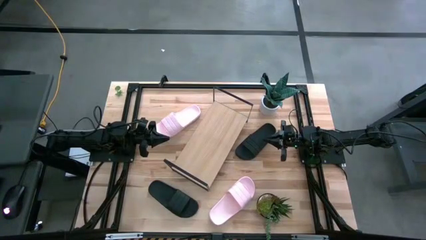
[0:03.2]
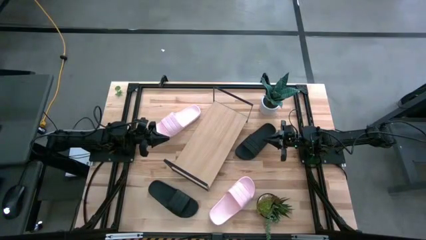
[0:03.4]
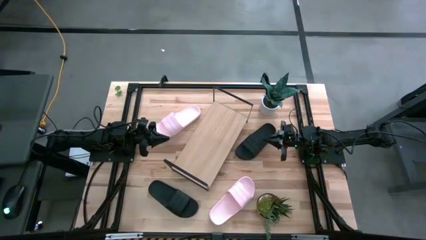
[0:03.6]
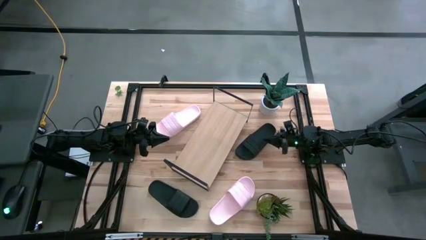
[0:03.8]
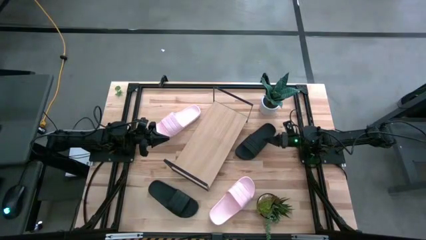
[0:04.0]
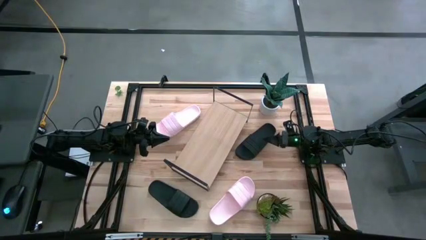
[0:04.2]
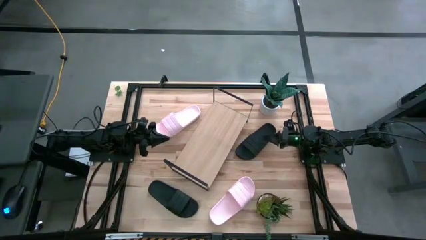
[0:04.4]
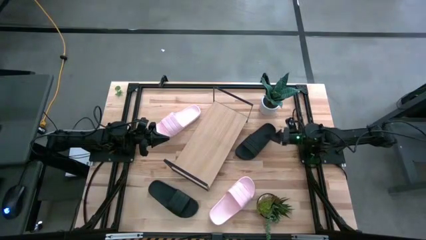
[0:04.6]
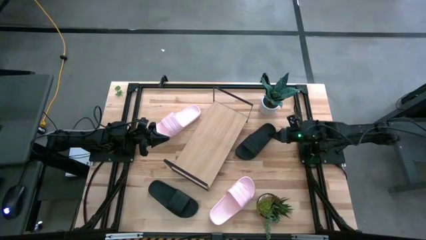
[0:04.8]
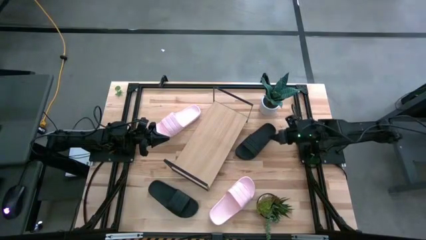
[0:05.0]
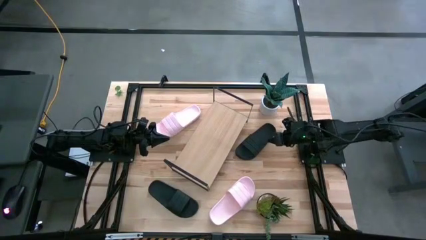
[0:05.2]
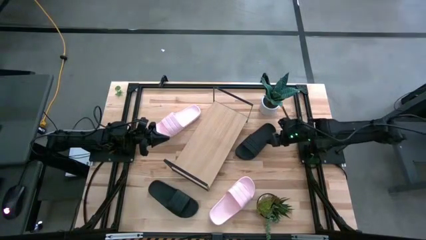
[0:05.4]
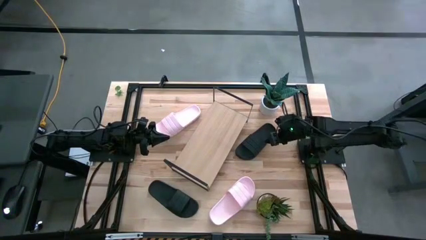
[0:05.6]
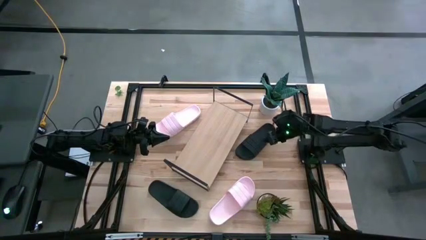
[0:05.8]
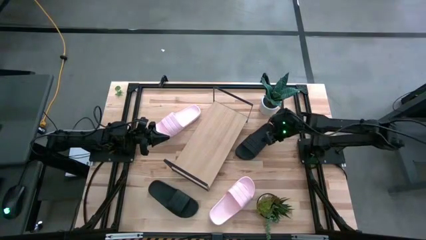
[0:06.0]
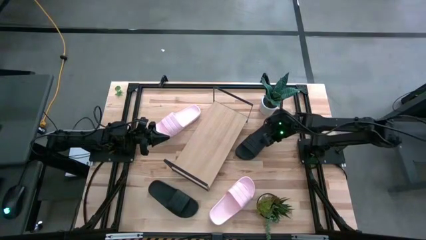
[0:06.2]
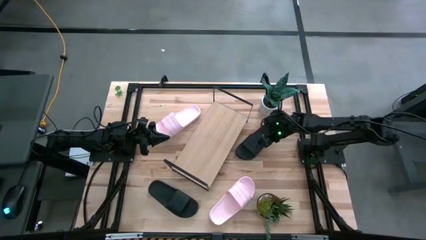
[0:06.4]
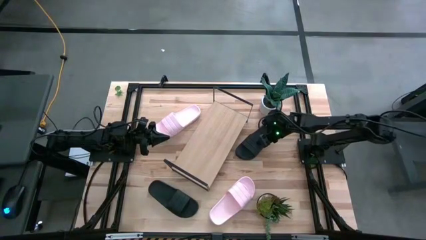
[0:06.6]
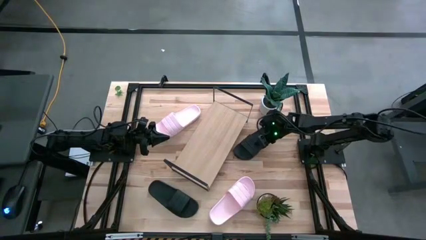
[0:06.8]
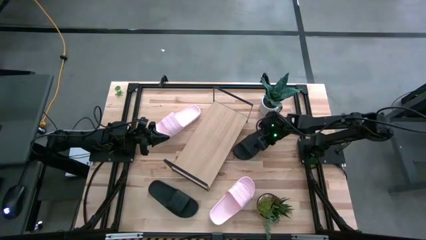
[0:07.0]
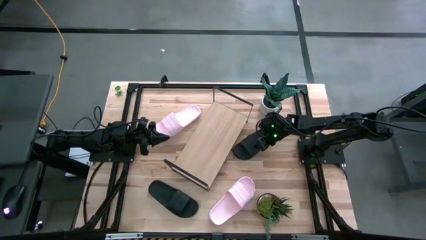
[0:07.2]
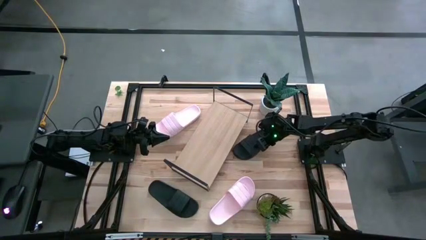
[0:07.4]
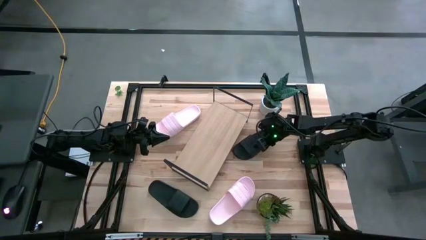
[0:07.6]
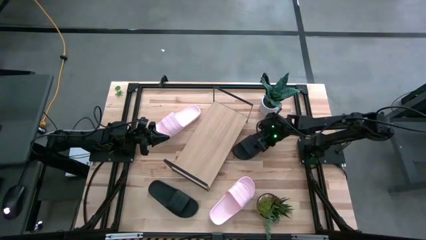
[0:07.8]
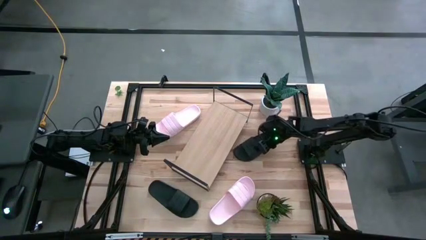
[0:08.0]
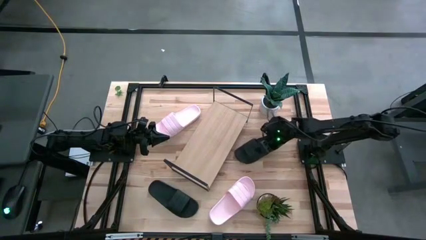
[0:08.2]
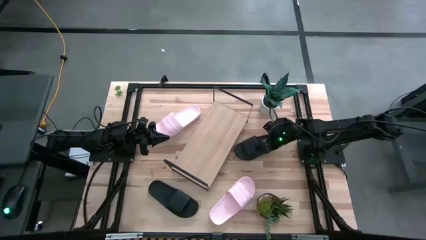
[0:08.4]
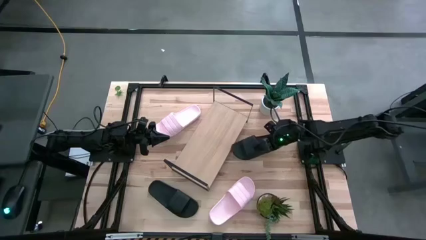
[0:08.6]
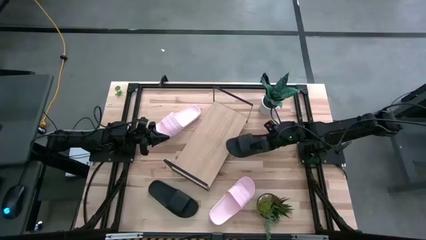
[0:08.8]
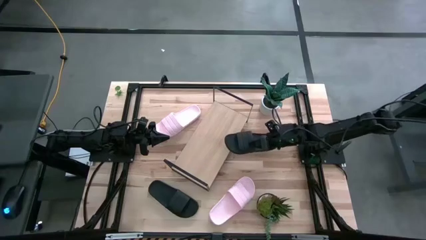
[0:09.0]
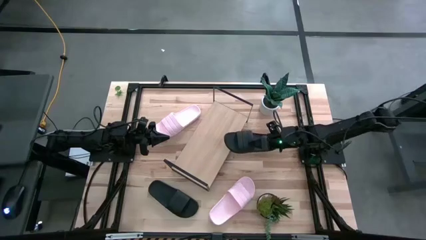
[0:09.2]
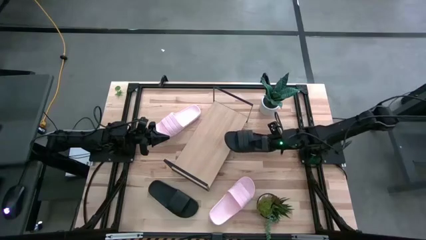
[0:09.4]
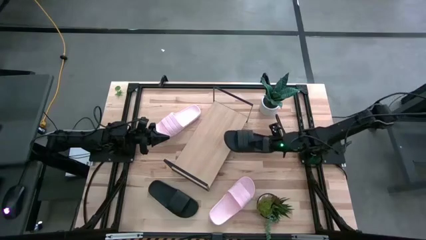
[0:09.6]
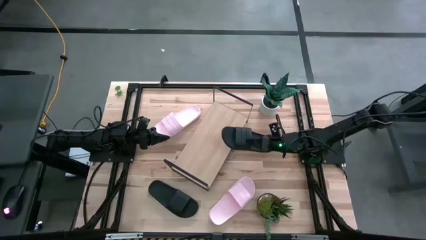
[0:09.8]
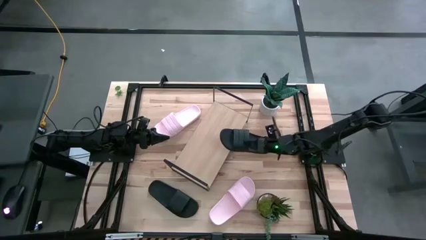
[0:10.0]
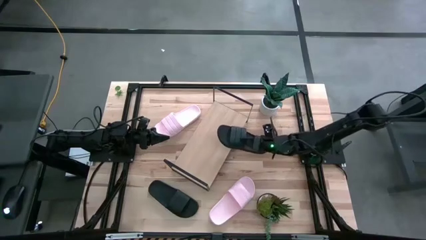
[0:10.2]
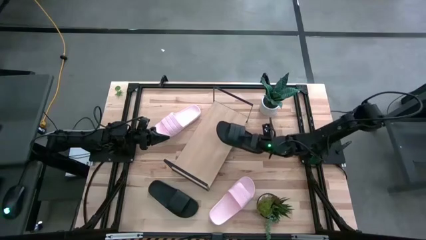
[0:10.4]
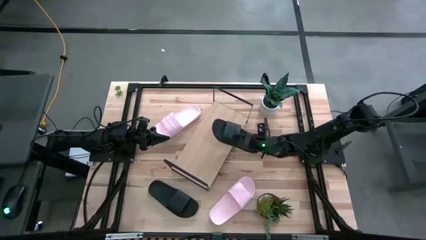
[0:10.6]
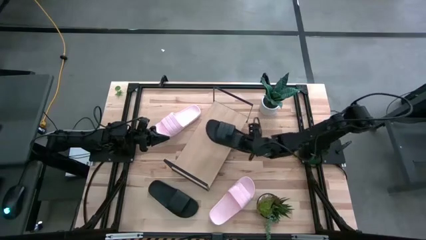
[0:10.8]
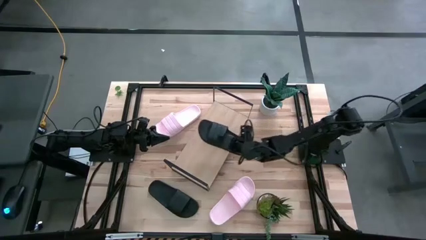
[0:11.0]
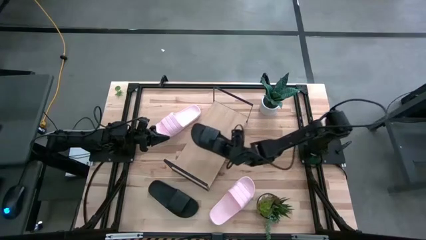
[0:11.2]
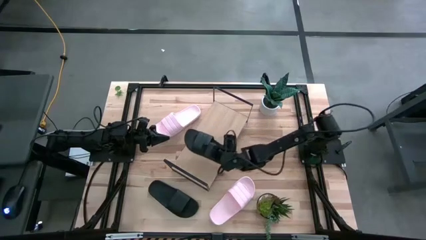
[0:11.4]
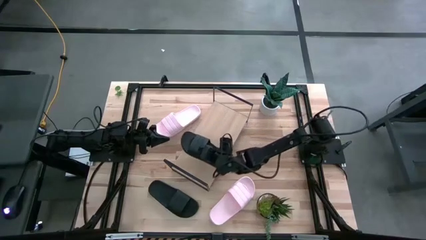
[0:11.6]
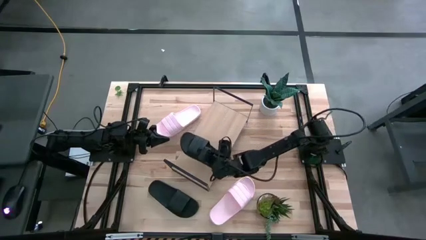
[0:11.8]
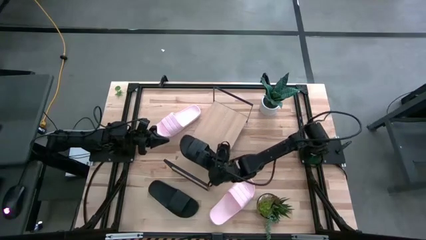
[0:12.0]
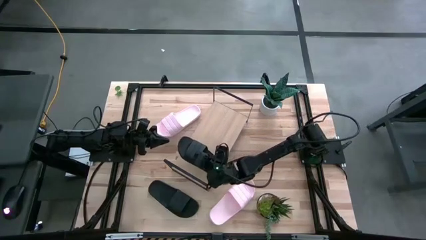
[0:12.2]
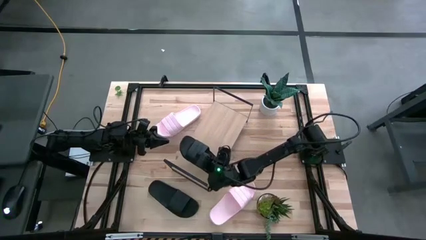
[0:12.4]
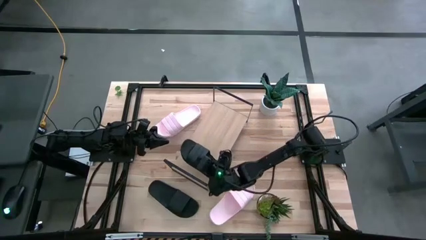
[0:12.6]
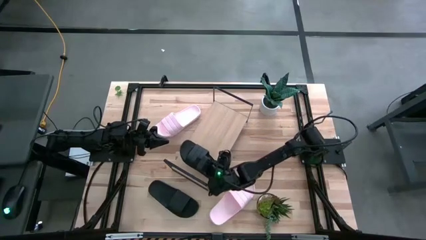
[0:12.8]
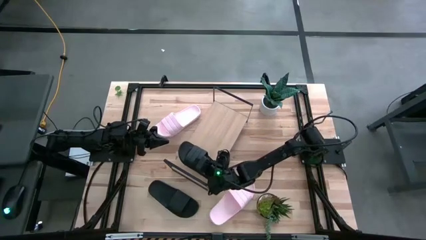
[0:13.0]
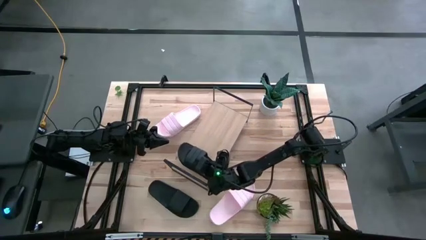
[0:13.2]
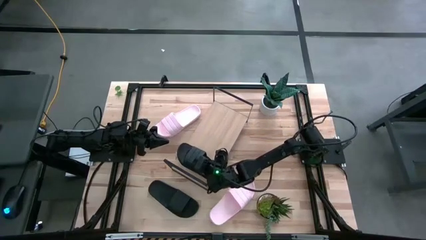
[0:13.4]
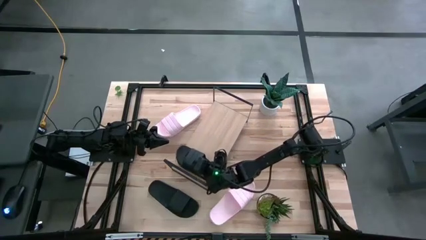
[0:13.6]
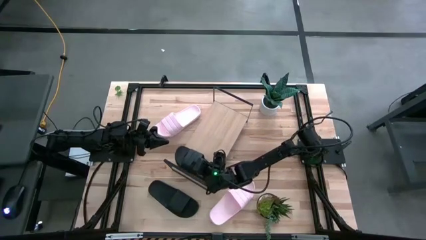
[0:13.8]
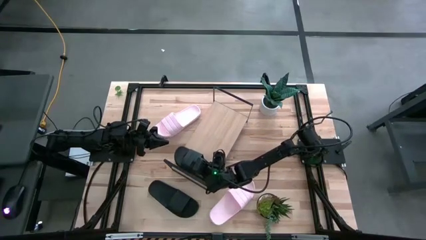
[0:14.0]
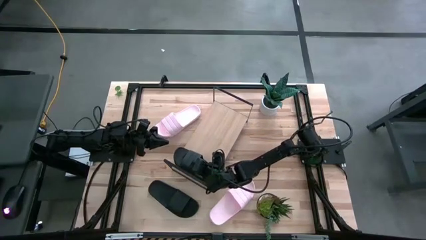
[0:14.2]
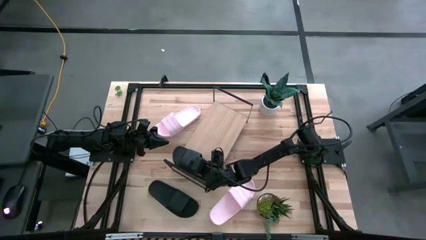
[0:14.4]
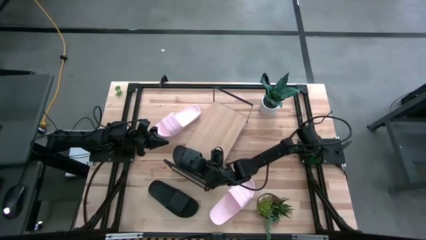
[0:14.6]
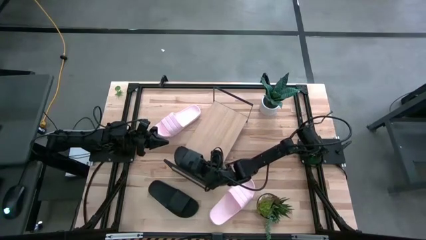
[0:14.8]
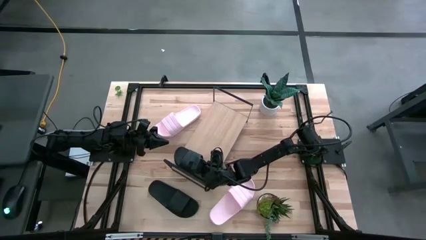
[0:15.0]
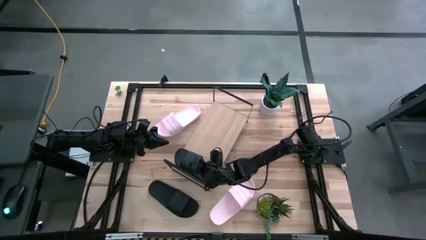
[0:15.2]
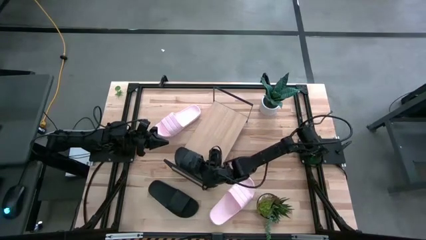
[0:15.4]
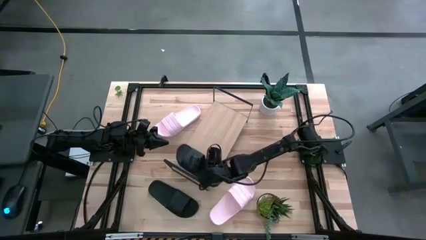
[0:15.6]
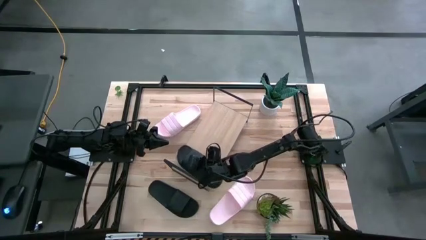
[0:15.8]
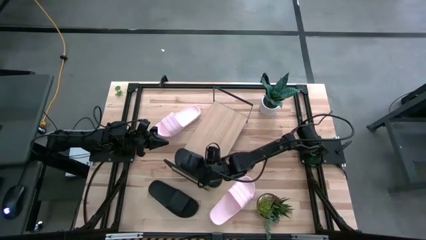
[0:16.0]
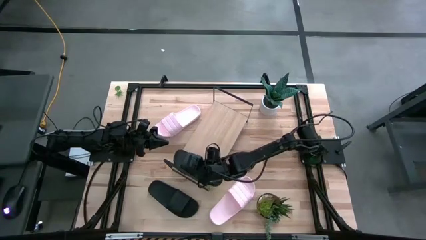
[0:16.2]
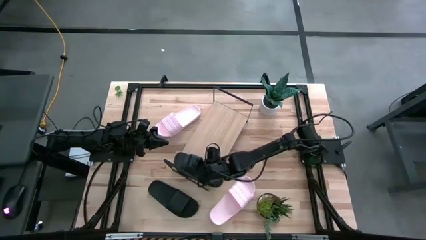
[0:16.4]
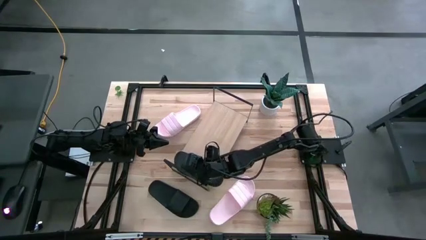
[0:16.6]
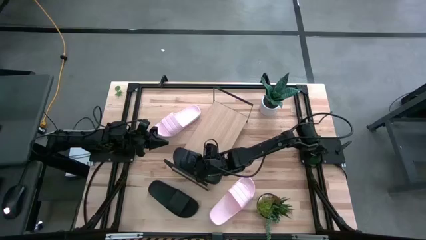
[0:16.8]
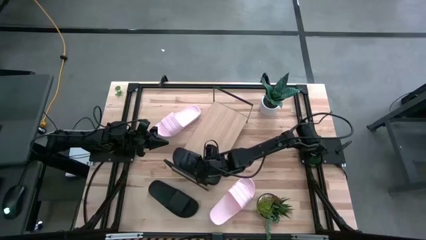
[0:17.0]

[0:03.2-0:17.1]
Task: Pick and place slides into the shelf
Put the top black slipper on the shelf
